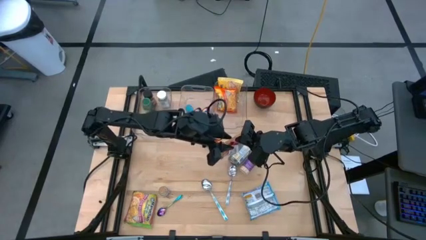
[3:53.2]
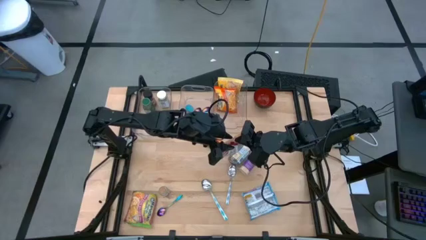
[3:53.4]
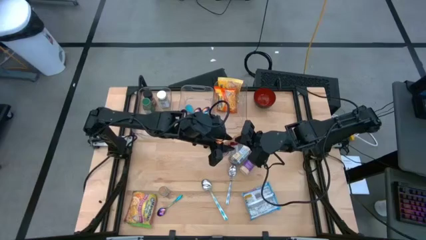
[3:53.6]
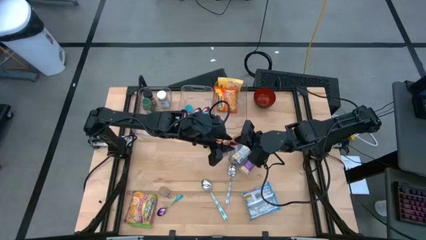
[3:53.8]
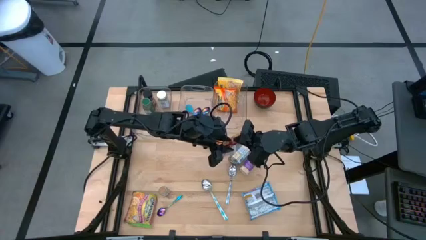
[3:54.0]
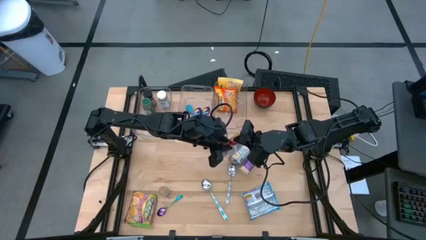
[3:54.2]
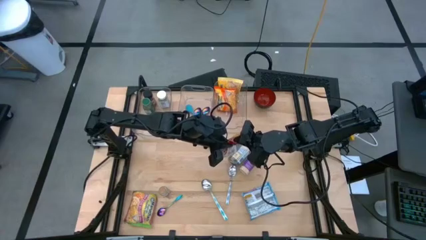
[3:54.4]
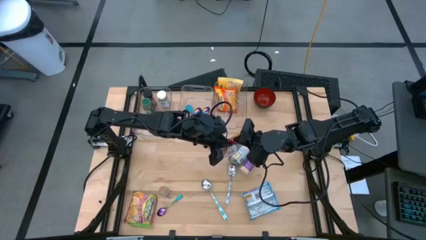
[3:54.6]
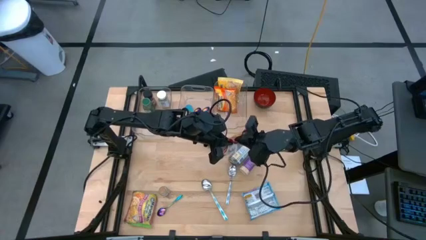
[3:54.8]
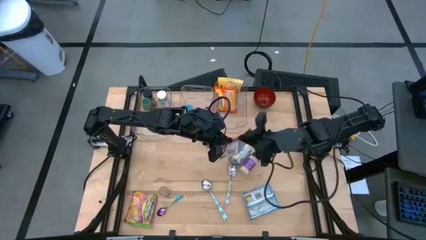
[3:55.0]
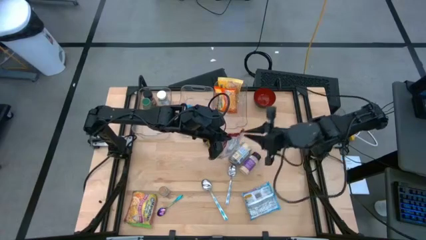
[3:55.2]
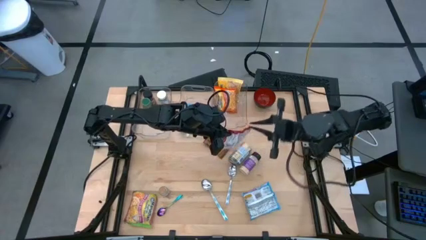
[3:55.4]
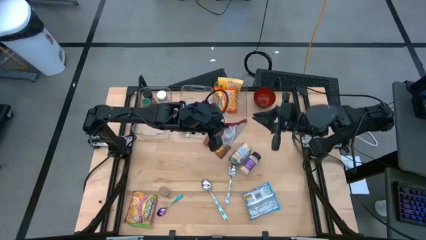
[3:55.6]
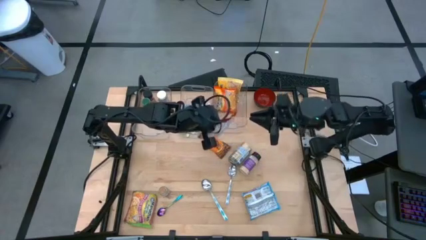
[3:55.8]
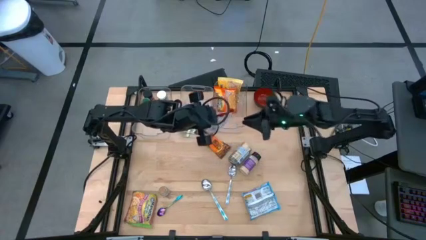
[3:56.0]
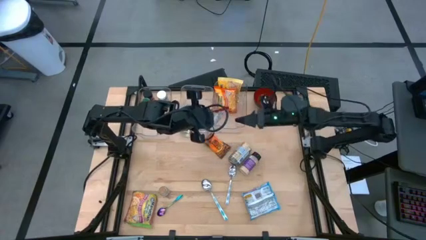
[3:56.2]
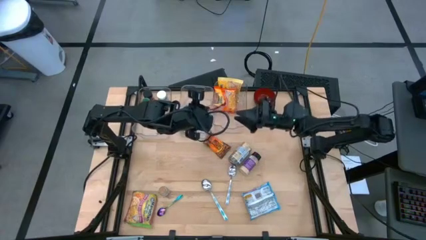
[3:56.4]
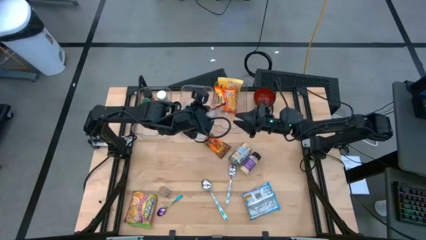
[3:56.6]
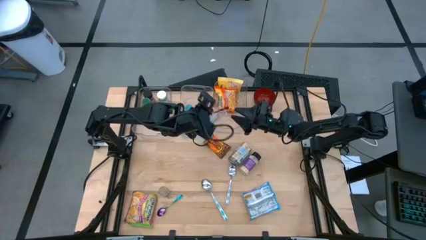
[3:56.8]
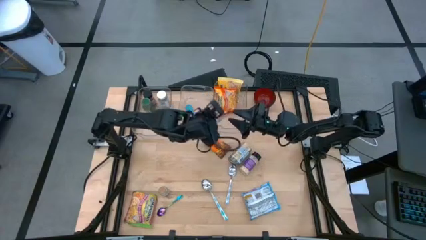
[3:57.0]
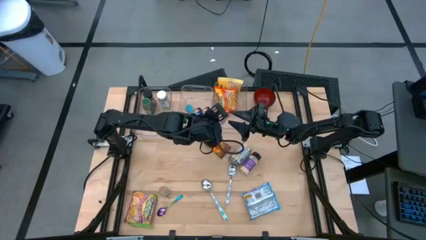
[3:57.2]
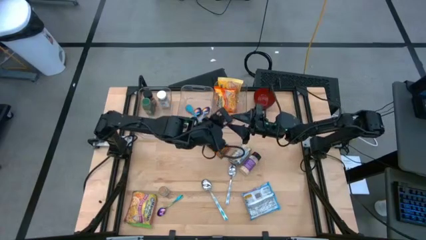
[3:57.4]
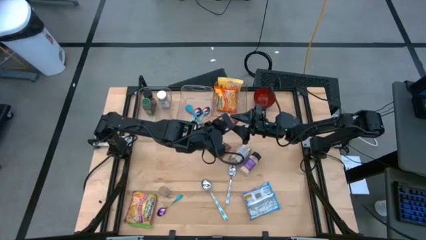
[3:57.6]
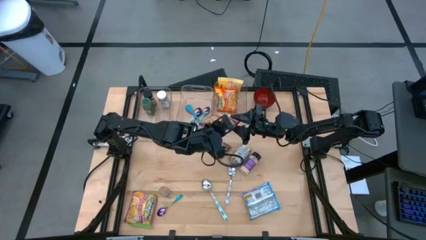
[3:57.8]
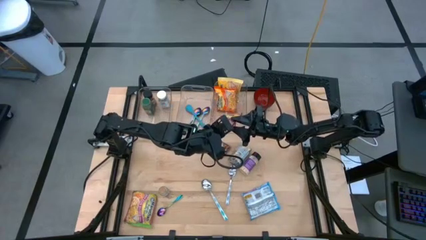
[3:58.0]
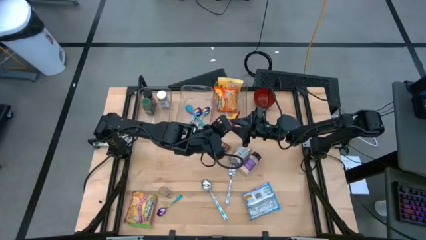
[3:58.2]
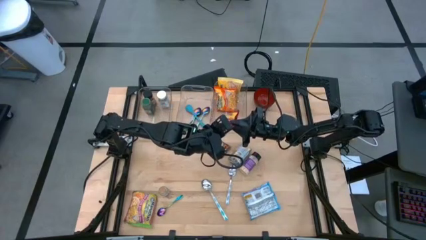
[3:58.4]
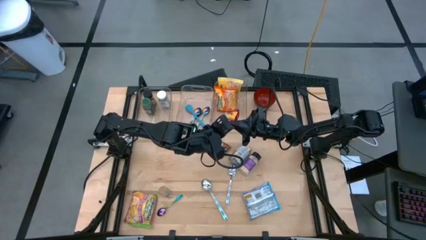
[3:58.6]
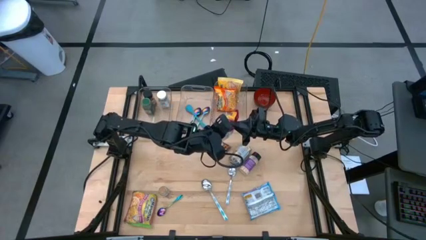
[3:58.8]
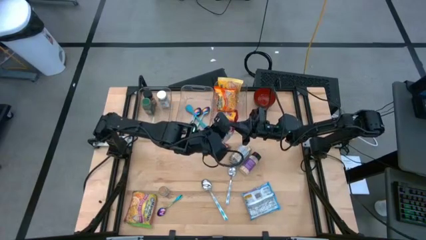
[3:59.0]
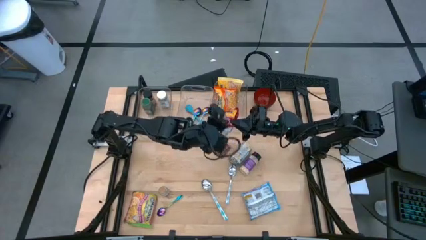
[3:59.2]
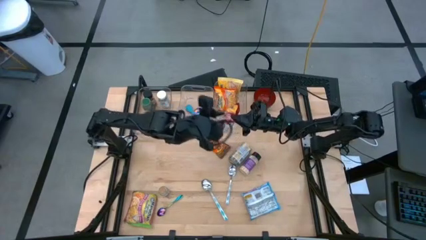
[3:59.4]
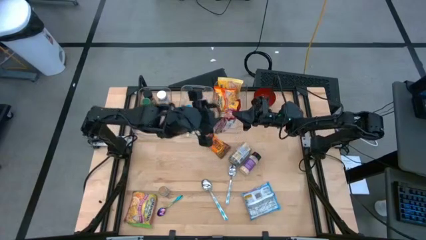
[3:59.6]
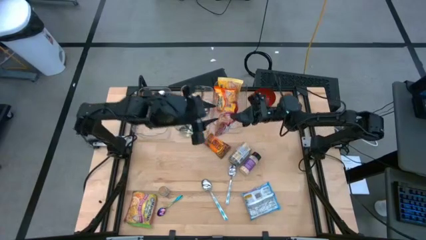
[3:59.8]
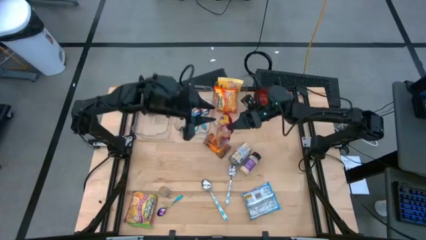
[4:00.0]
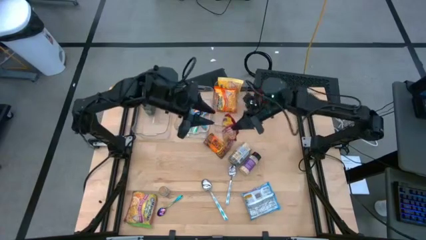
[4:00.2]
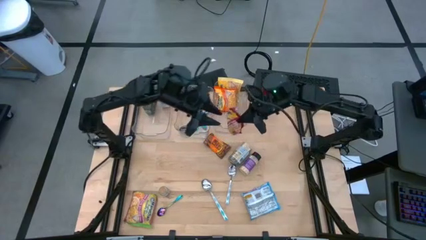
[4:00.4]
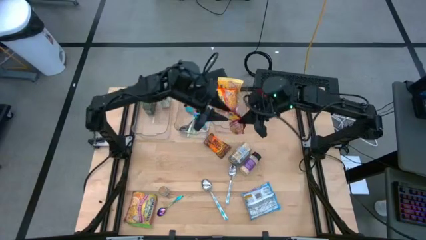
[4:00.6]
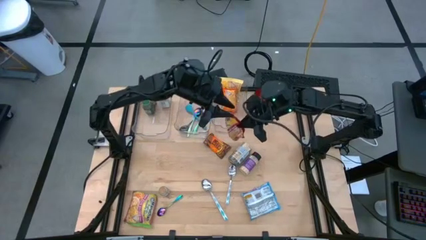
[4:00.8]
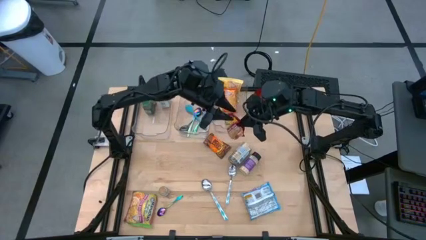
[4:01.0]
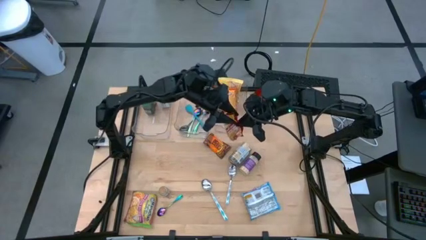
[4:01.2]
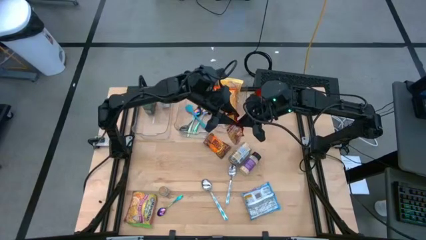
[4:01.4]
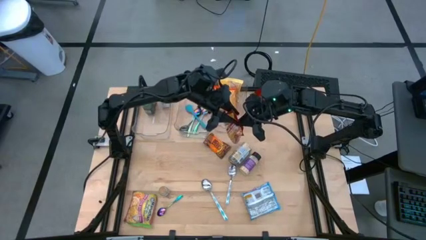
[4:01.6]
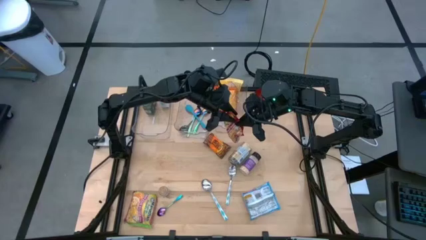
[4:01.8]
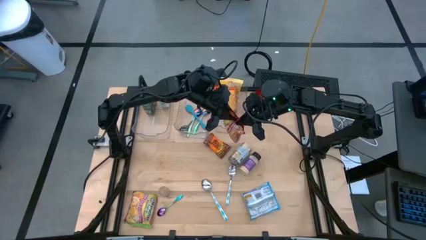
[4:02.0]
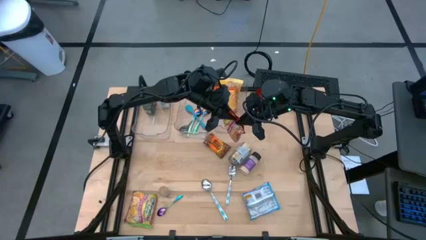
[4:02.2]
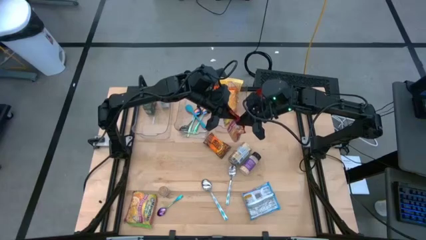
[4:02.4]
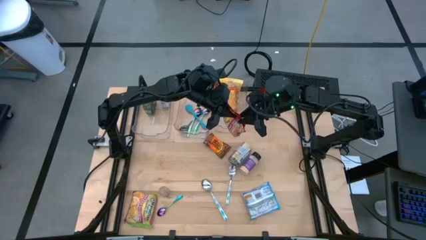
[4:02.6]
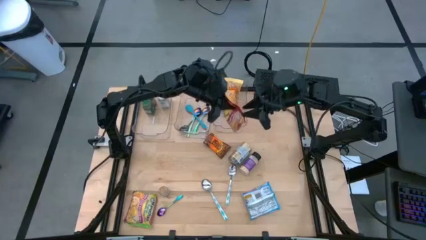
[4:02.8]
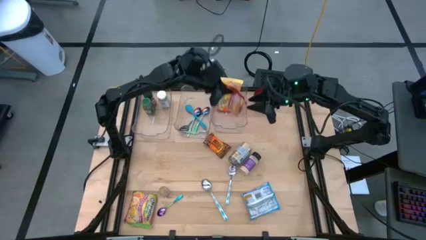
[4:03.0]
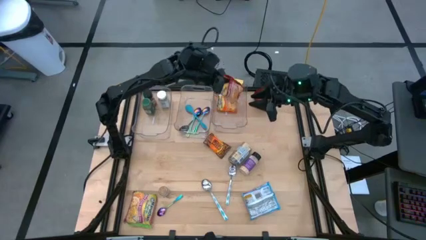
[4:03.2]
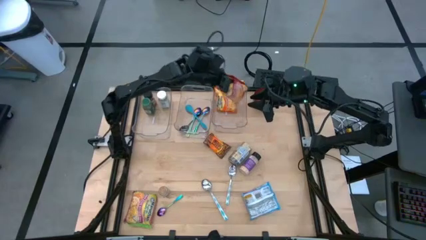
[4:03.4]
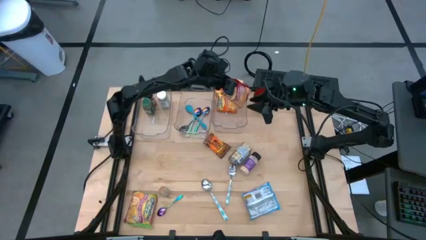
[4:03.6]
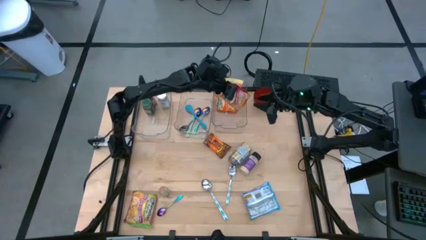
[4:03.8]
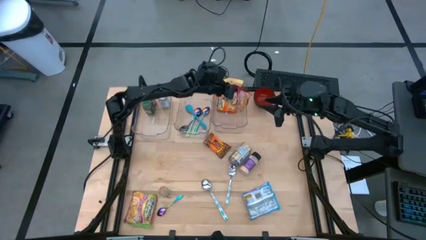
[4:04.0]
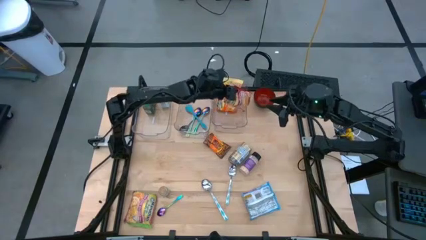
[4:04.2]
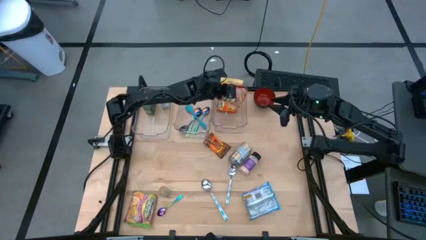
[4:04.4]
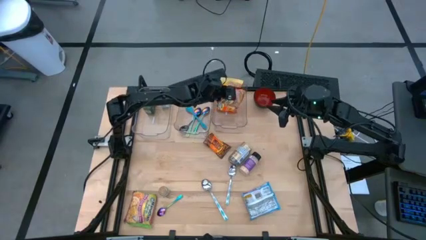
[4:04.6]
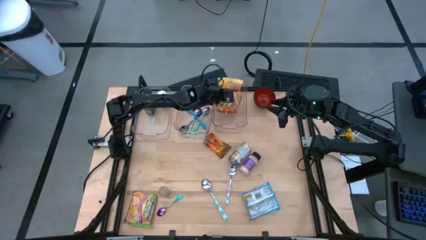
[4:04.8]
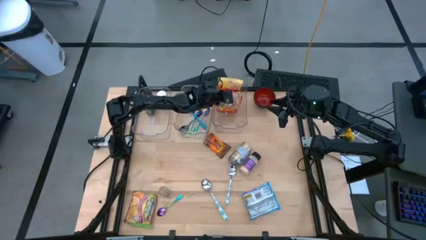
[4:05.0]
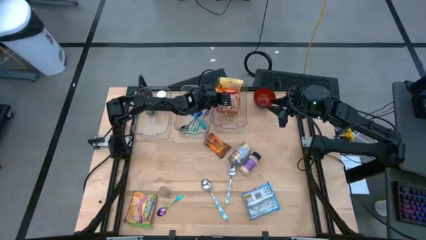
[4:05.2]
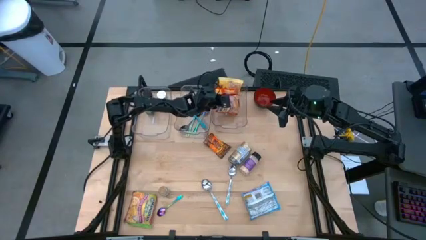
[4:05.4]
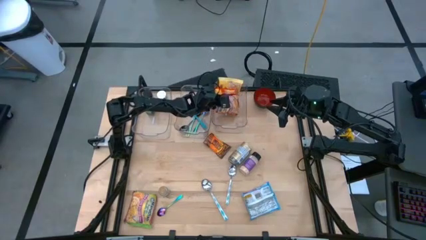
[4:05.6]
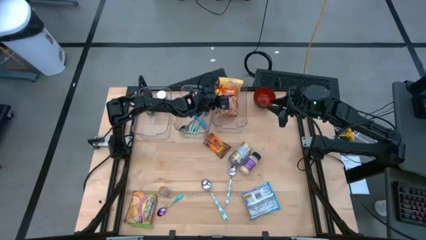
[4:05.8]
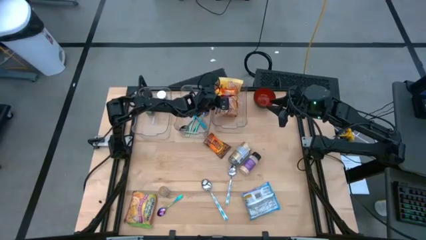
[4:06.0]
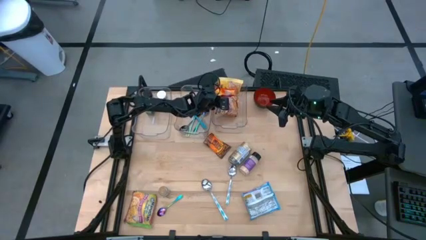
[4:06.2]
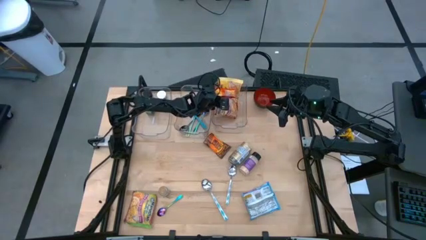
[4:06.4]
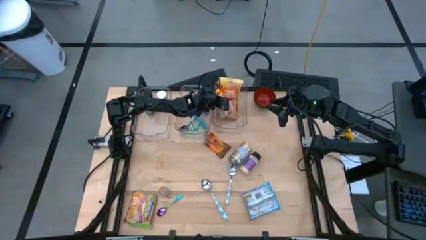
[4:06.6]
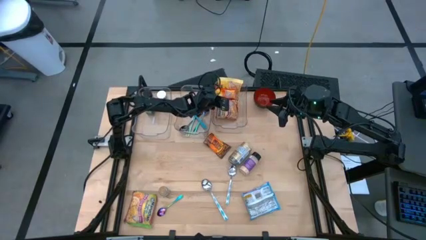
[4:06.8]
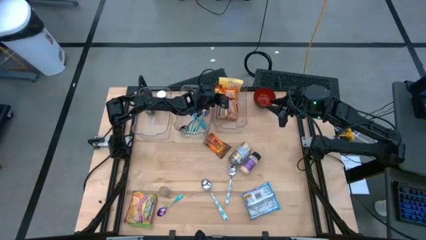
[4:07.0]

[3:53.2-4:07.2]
Task: Pick & Place Food Item
Put the red noodle pack into the right transparent bin
